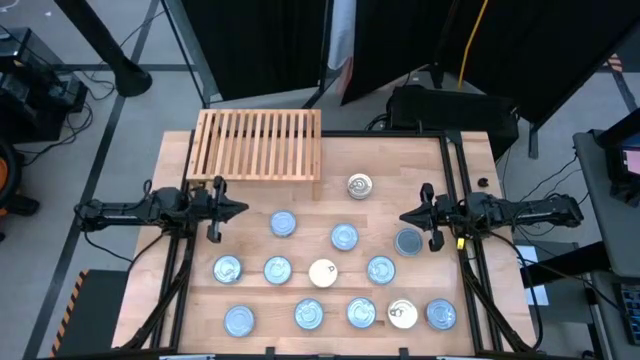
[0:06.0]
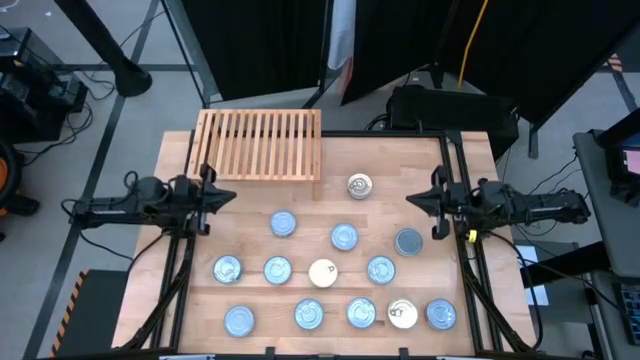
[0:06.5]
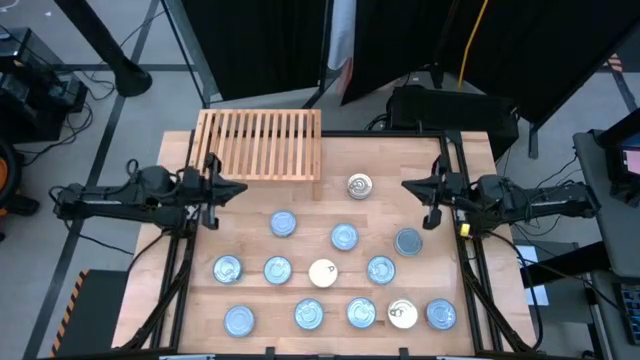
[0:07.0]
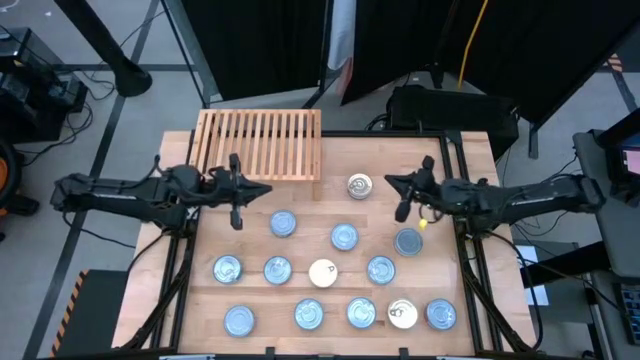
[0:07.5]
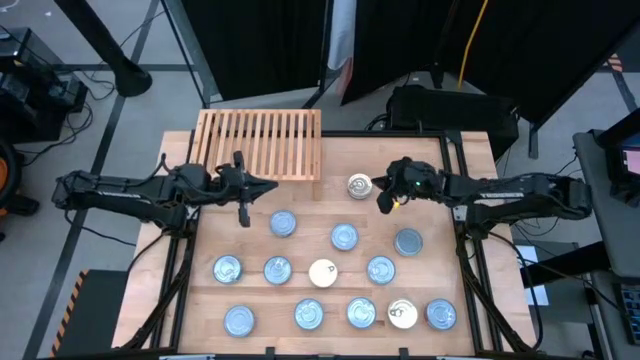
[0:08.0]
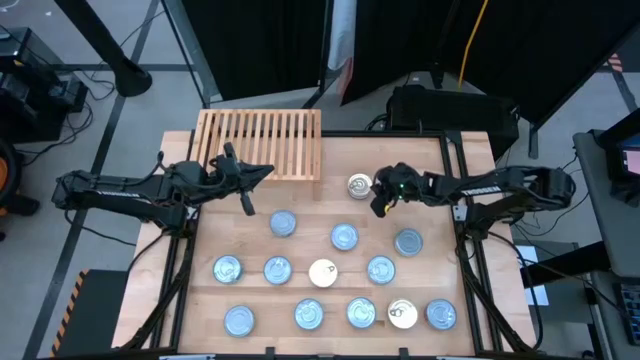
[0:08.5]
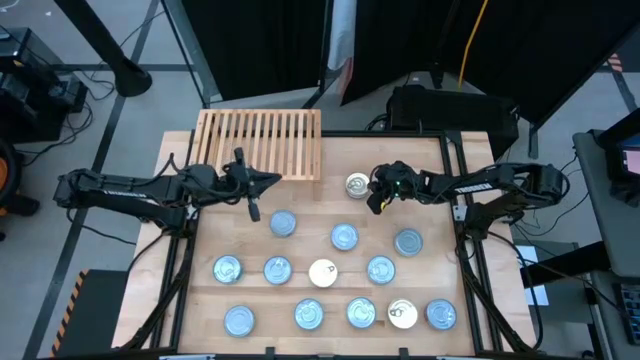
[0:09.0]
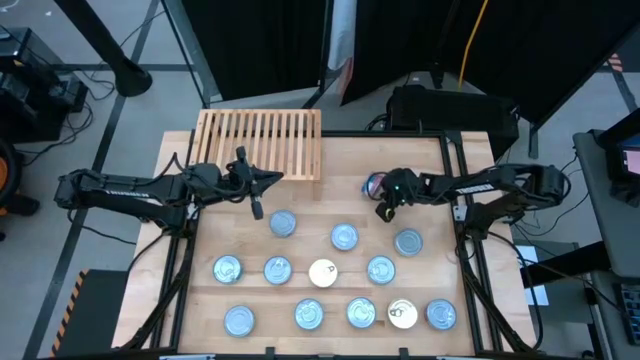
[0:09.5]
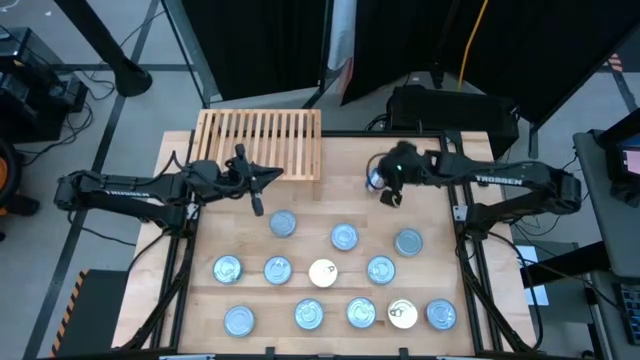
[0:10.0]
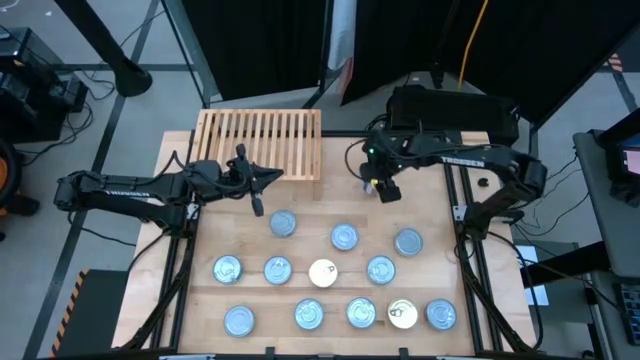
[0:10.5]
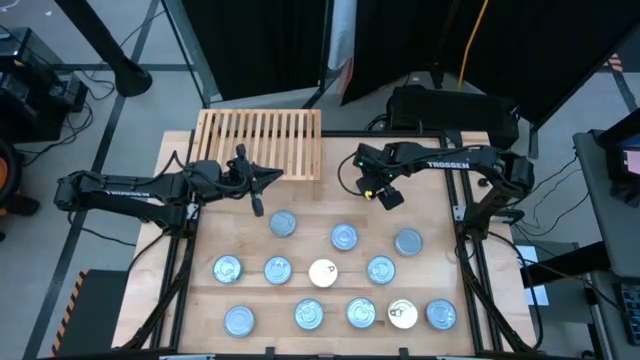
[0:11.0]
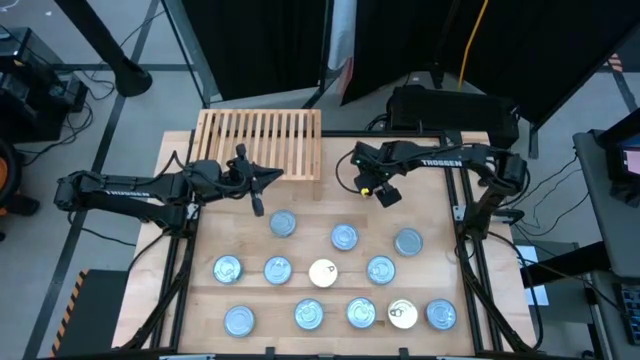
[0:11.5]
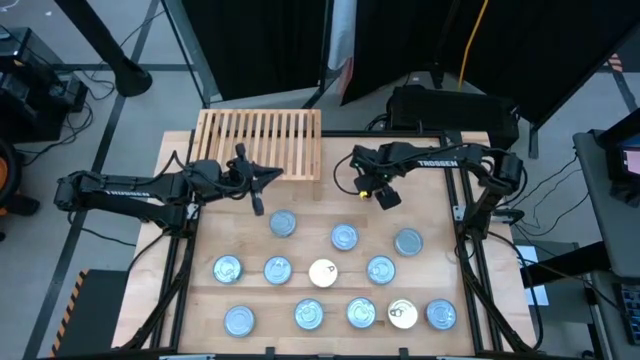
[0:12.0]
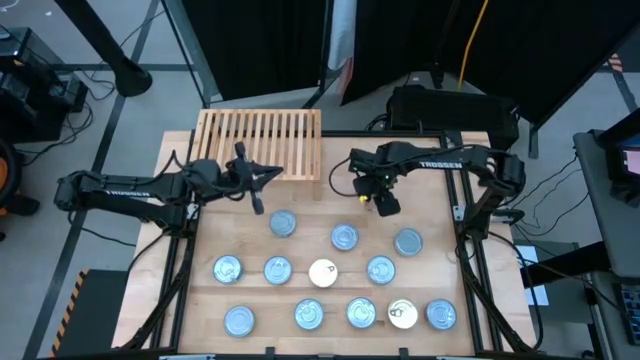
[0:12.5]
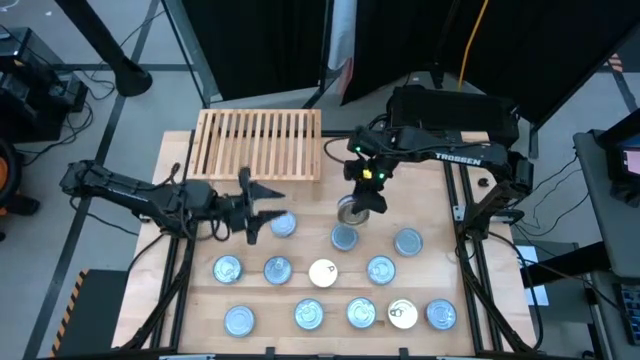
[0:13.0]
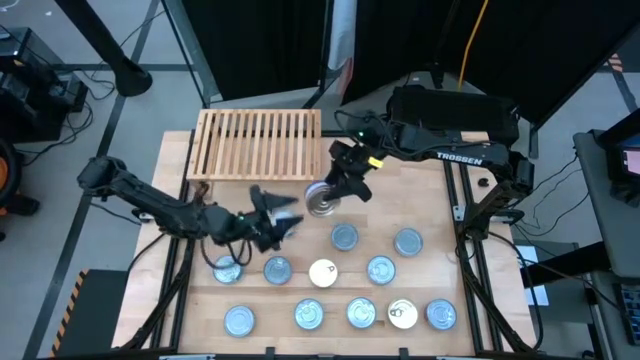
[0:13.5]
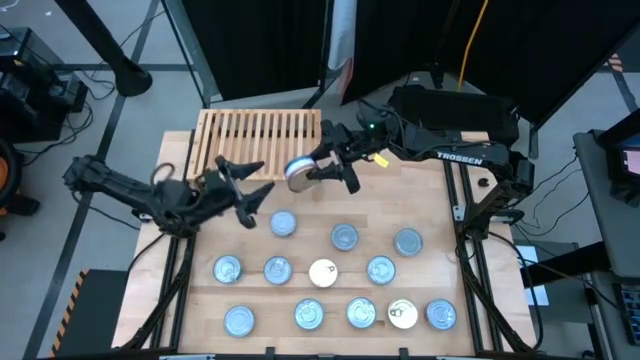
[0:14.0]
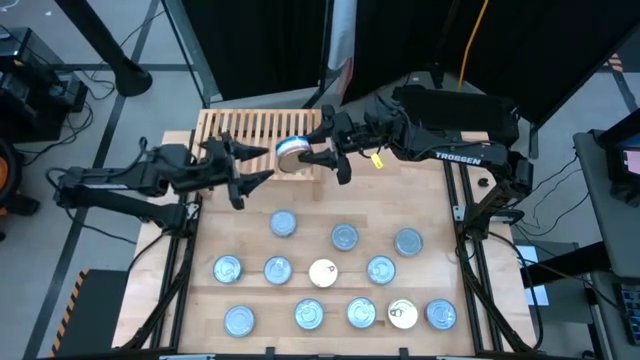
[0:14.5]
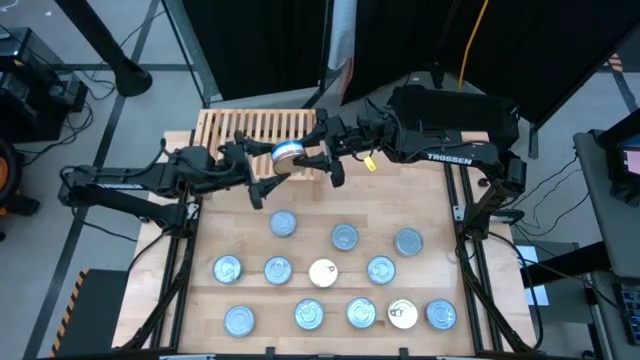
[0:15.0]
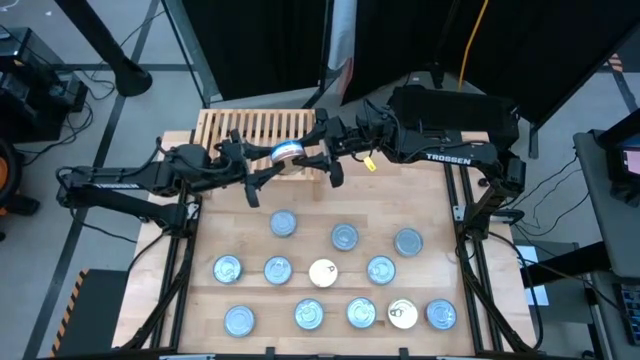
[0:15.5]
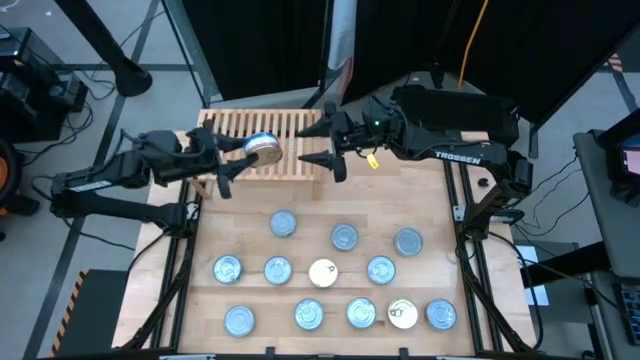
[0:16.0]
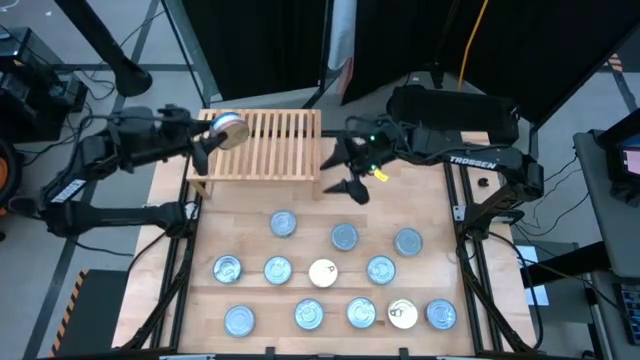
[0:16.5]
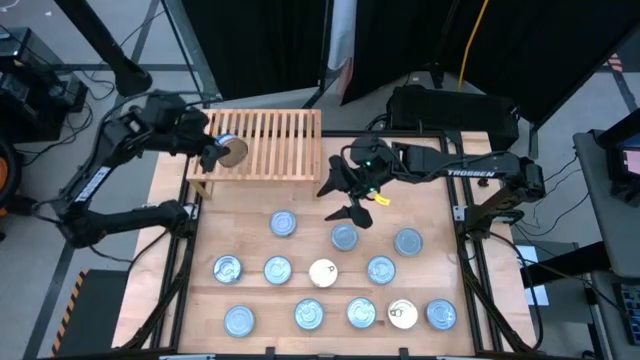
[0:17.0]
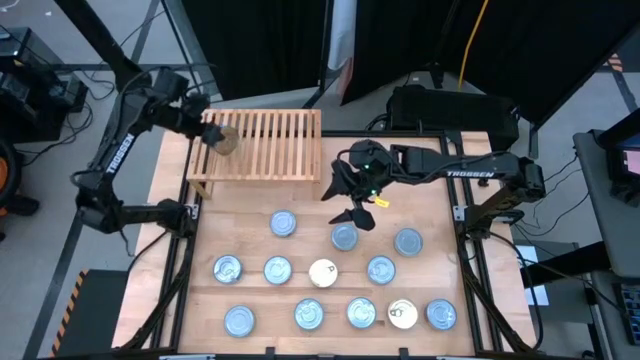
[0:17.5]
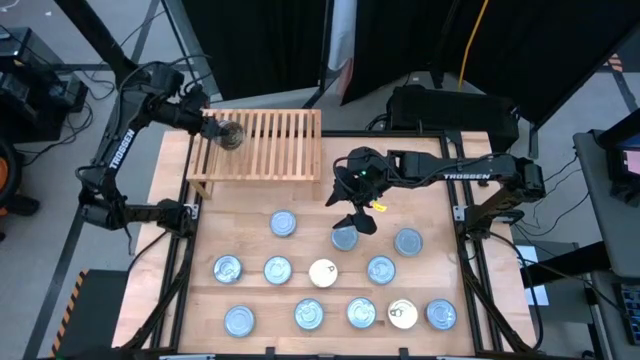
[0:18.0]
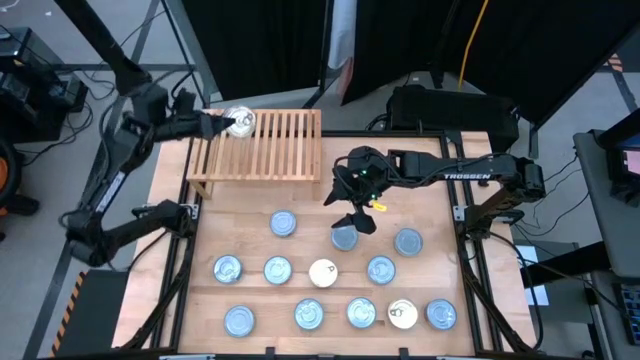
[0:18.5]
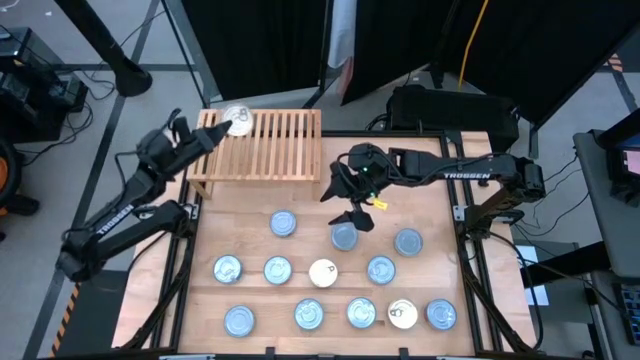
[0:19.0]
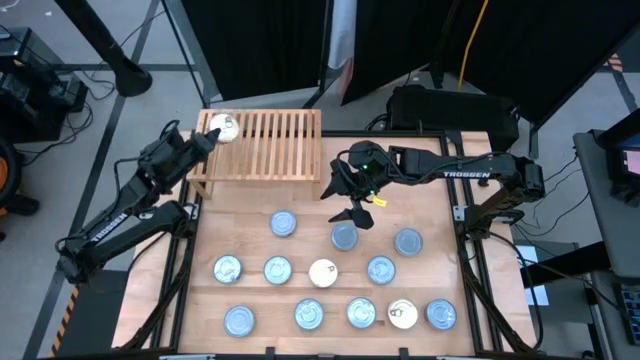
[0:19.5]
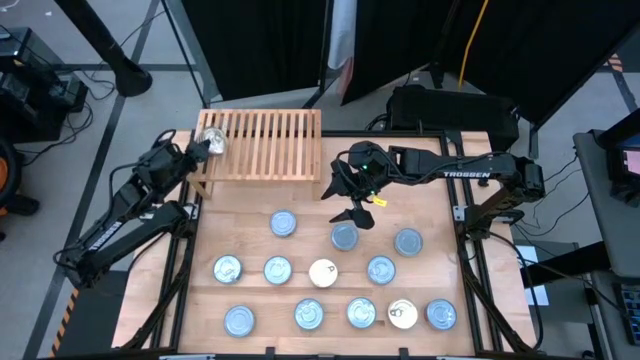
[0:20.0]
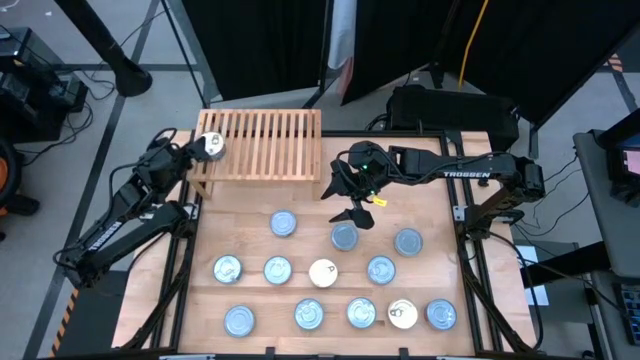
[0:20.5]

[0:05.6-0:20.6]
Task: Stack canned seafood by type on shelf
Put the top right blue can on the shelf

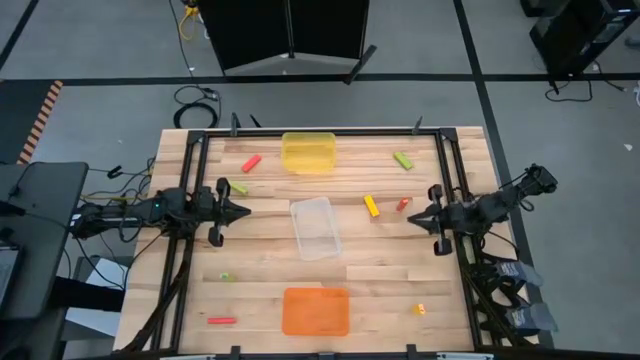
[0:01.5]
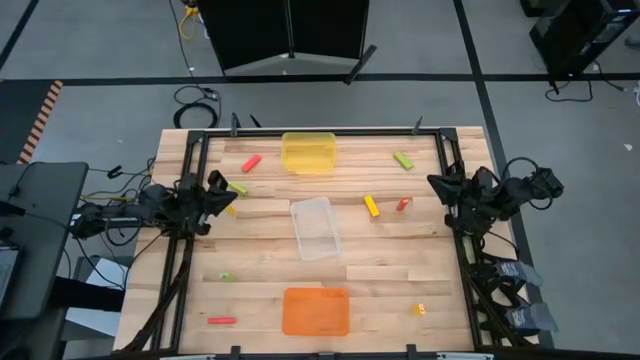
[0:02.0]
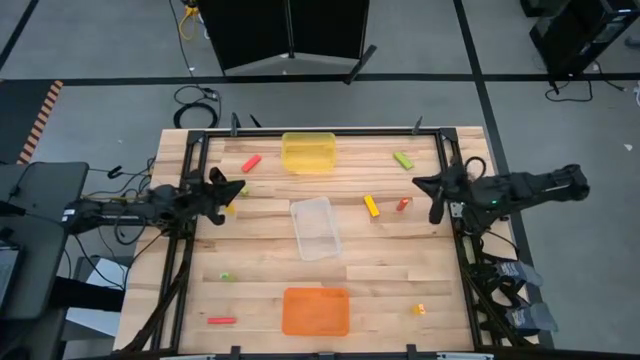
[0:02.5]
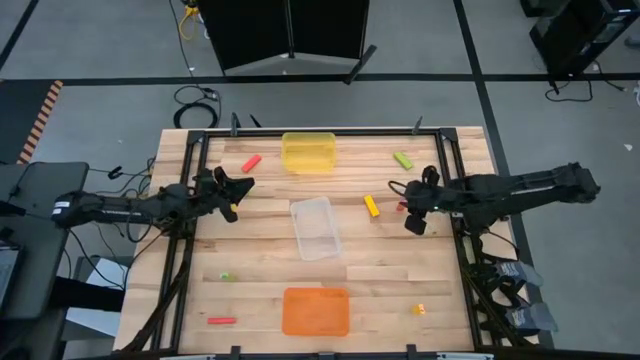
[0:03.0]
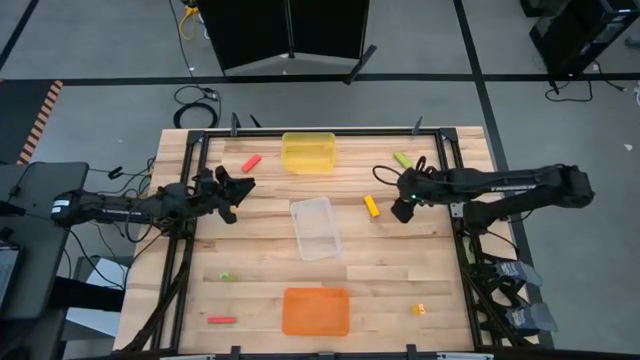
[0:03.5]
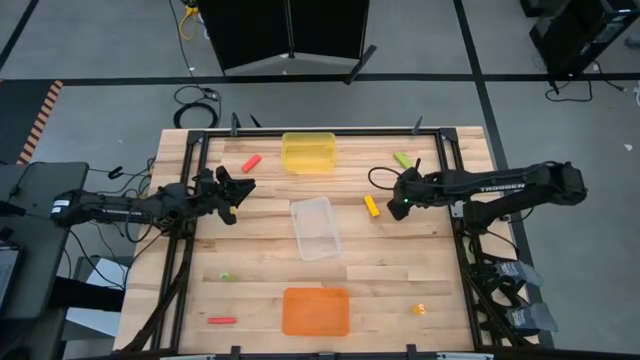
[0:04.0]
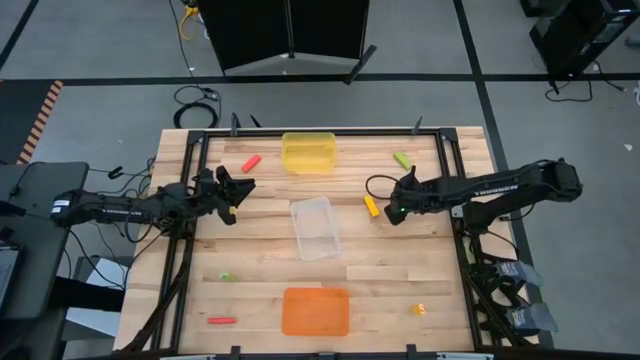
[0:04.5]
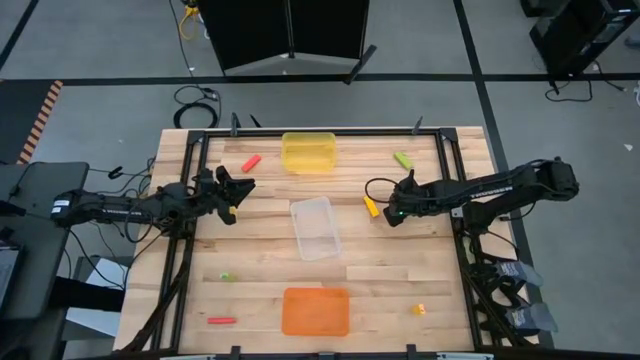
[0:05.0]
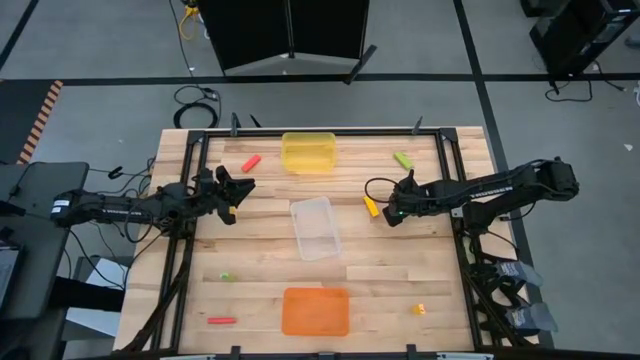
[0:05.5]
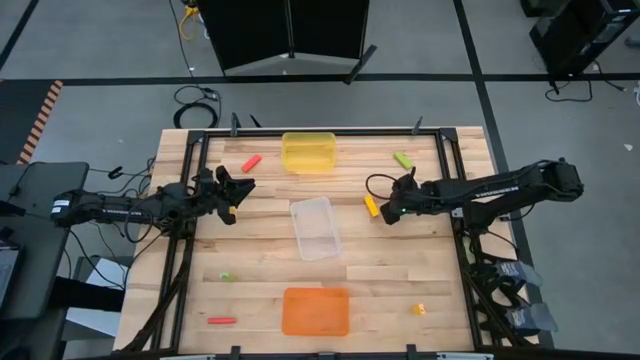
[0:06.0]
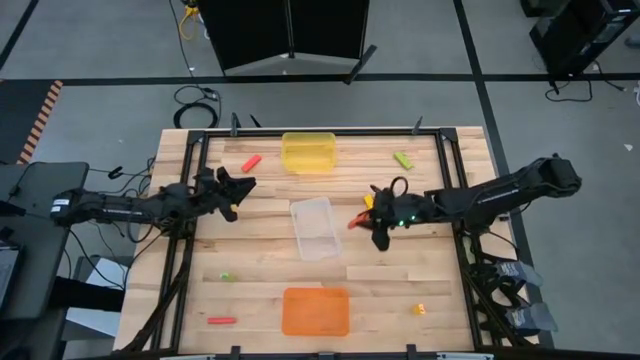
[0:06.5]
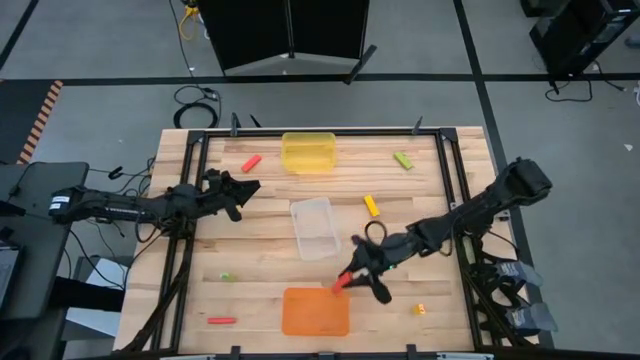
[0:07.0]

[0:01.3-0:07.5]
Task: Sort blocks
Put the top right orange block into the orange bin
